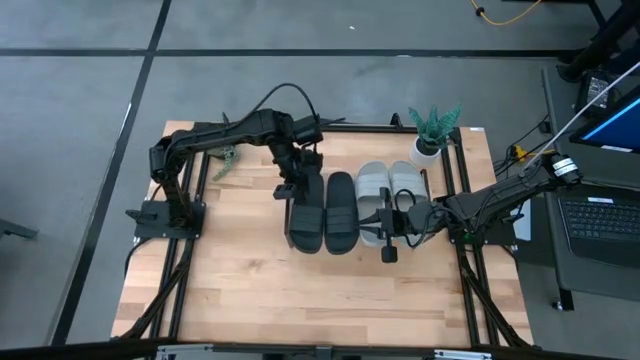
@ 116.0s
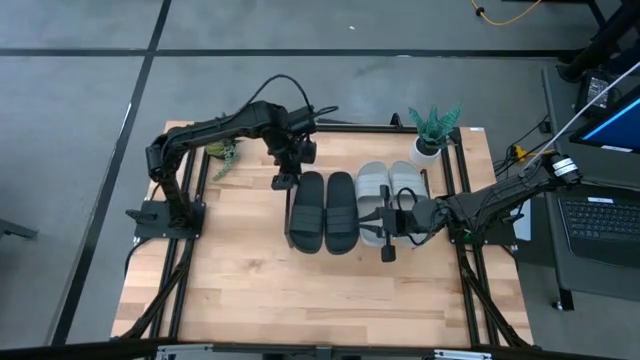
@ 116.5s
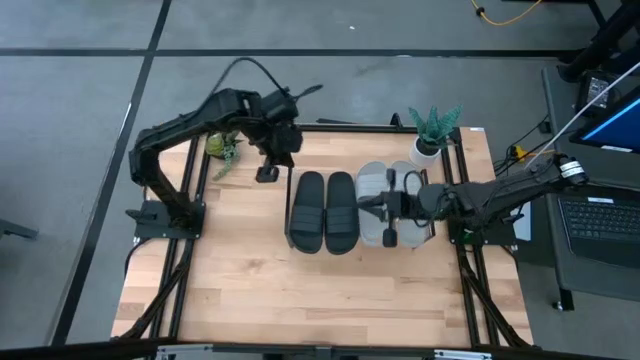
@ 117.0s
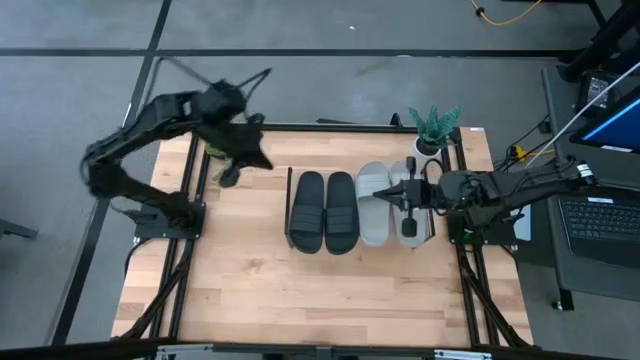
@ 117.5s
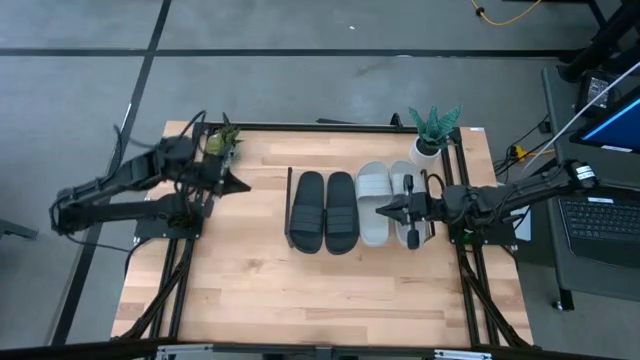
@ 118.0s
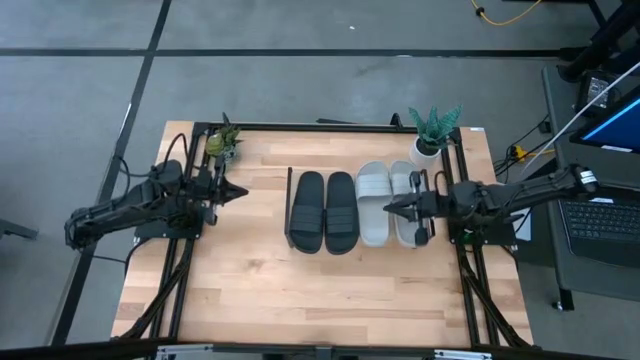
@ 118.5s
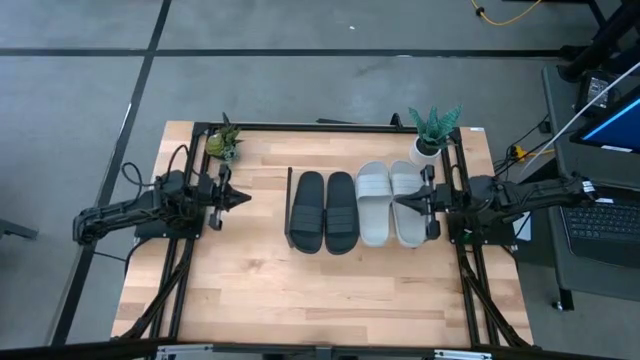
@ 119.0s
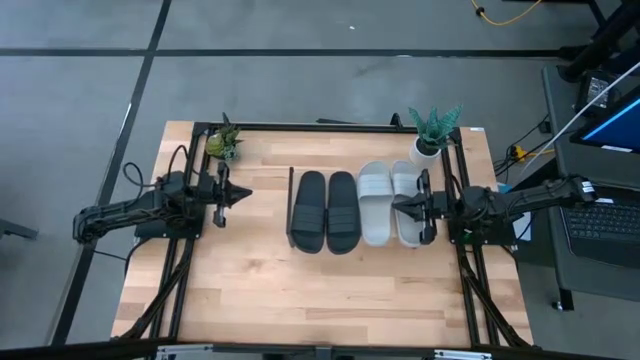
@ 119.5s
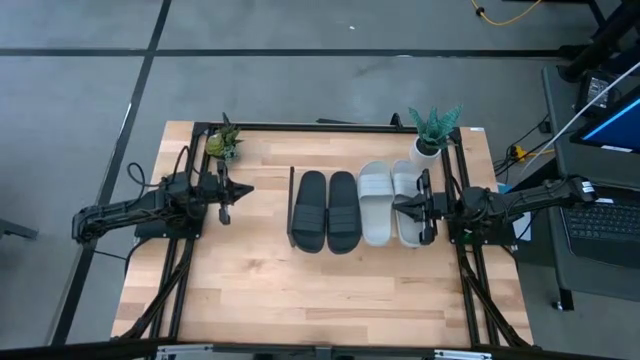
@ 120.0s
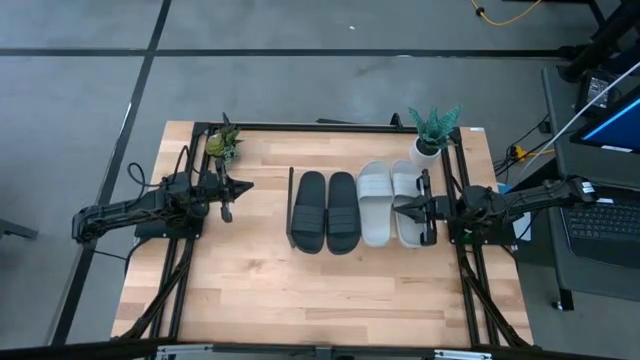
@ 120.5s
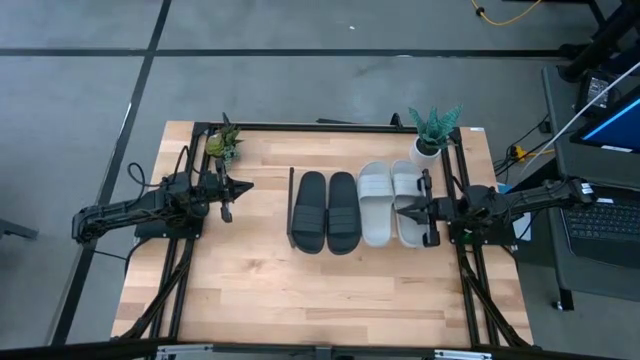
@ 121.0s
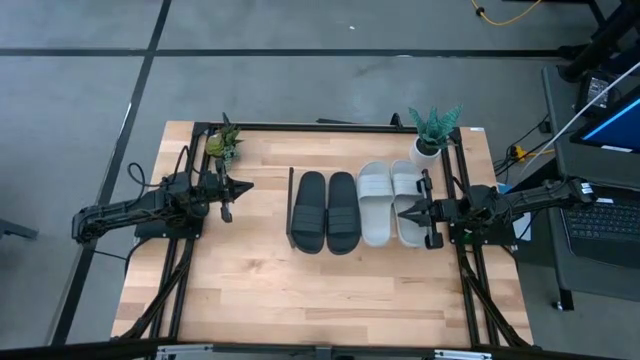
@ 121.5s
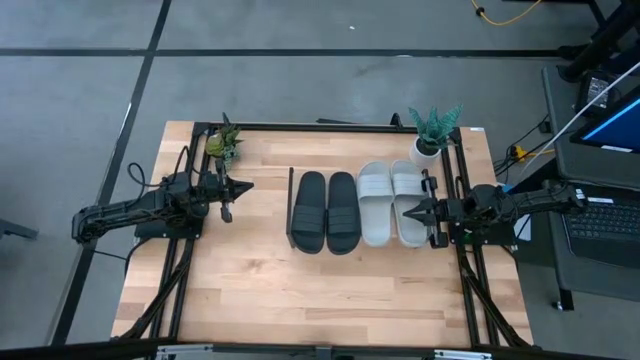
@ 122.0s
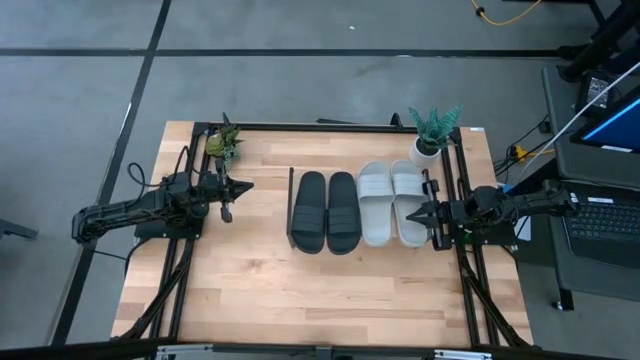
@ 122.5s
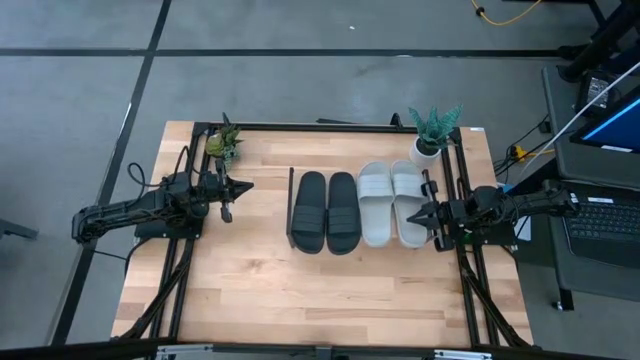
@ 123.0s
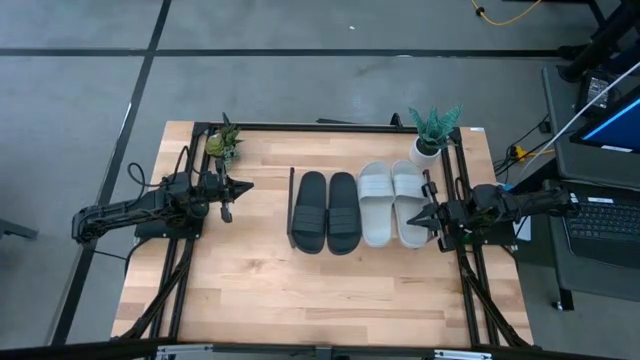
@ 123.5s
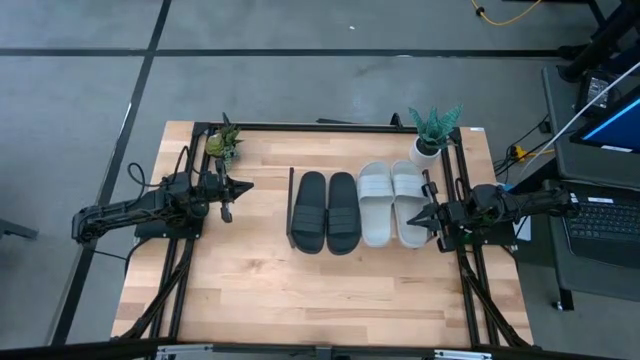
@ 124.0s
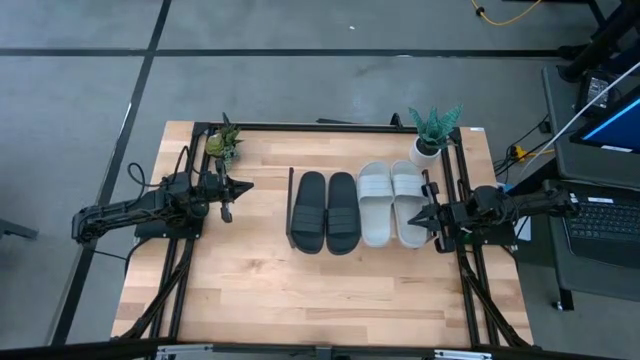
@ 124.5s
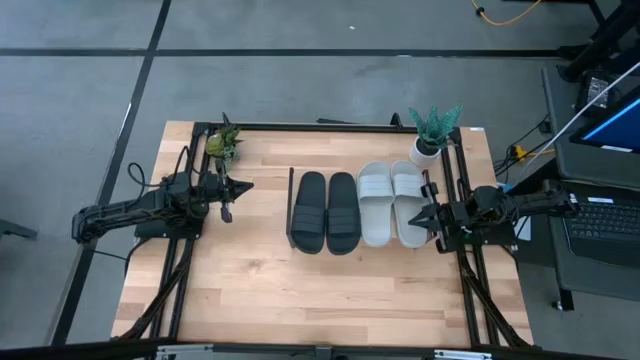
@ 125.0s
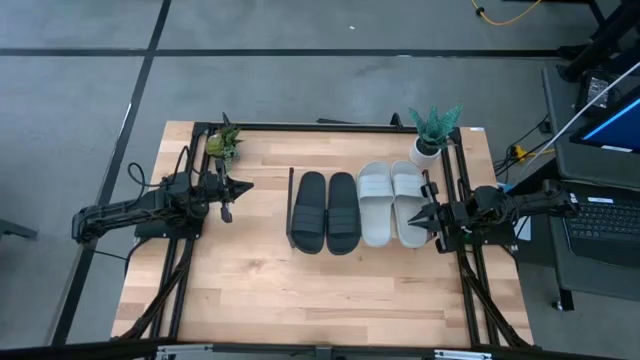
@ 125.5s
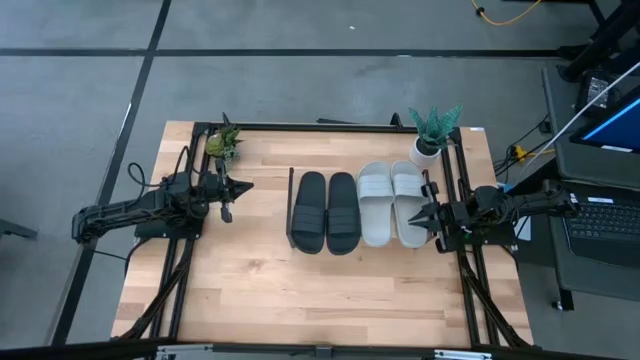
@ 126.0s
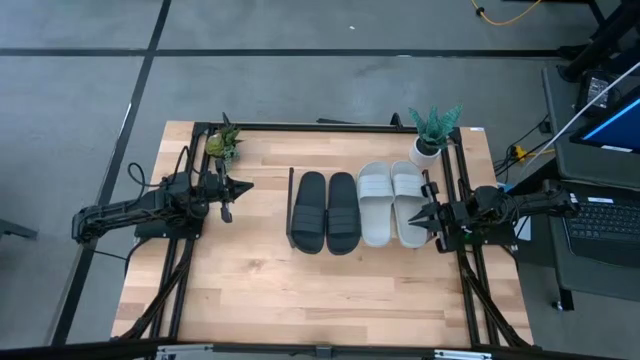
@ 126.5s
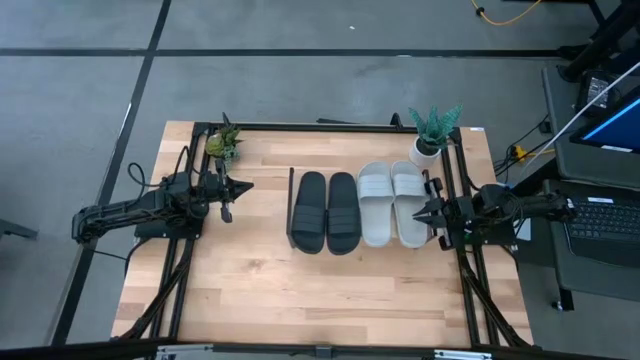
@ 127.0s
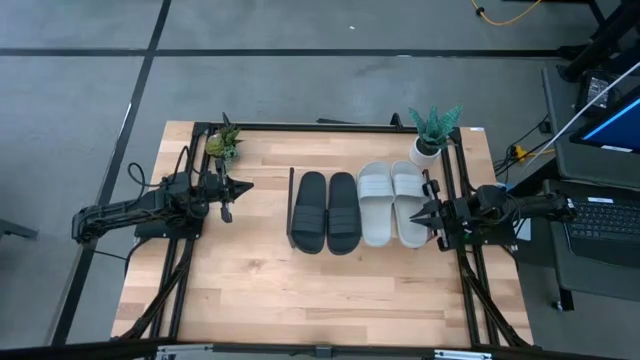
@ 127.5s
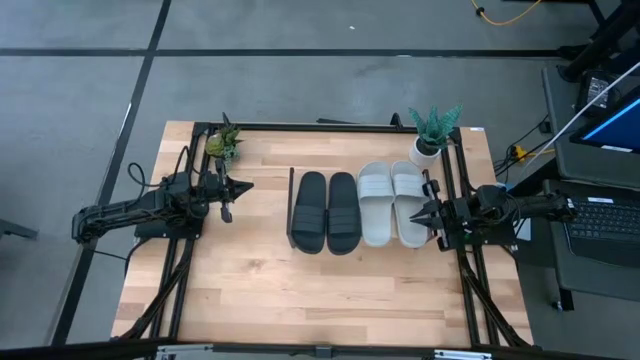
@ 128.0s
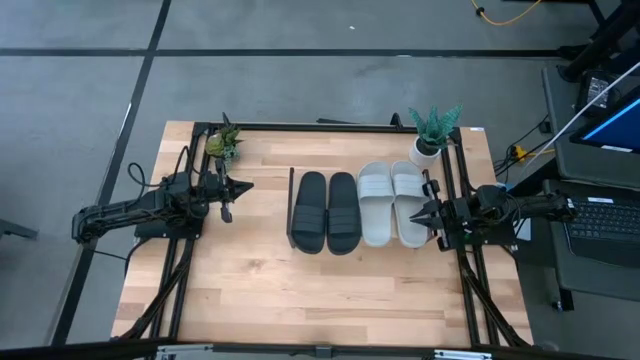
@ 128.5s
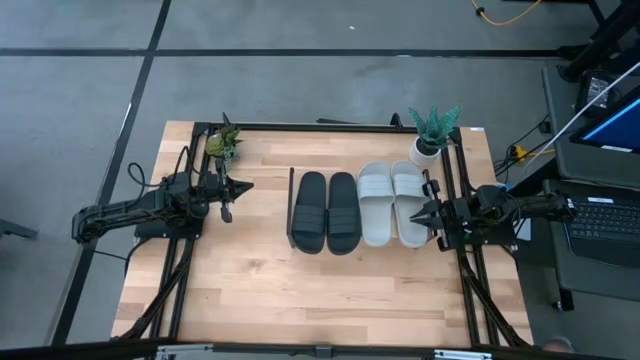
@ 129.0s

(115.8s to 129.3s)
Task: Pick and place slides into the shelf
Return to Home Position

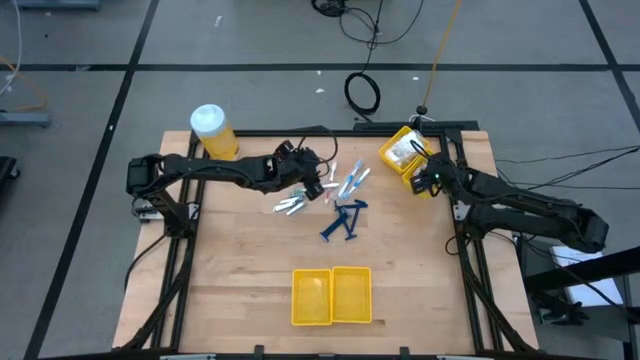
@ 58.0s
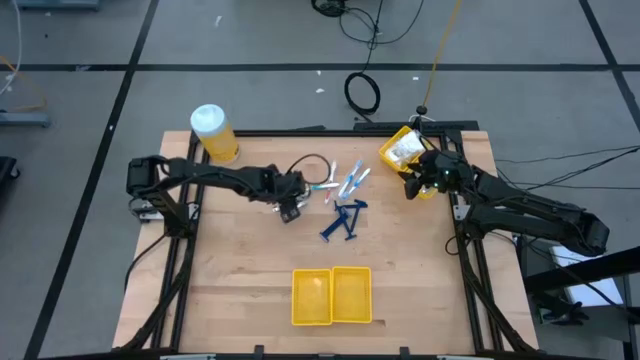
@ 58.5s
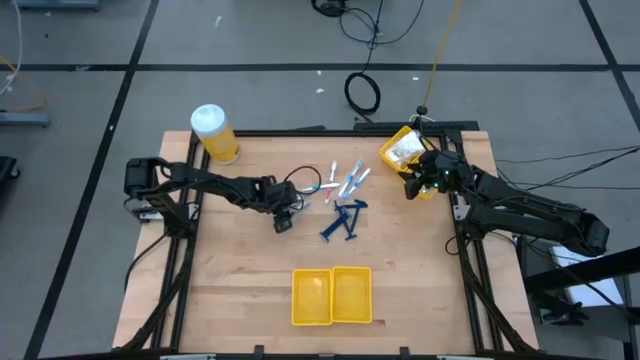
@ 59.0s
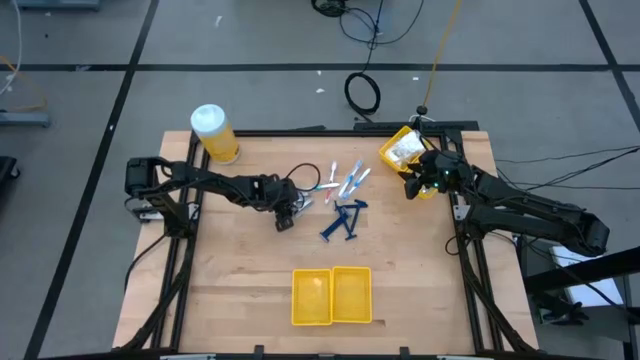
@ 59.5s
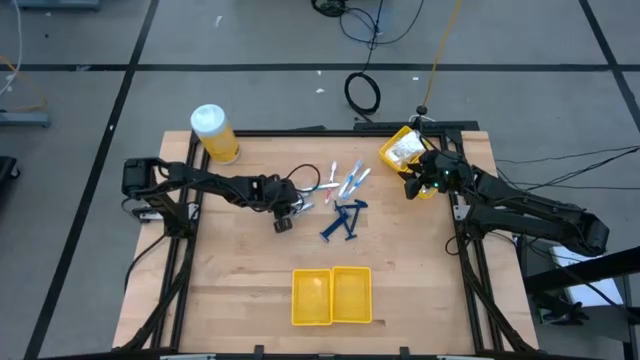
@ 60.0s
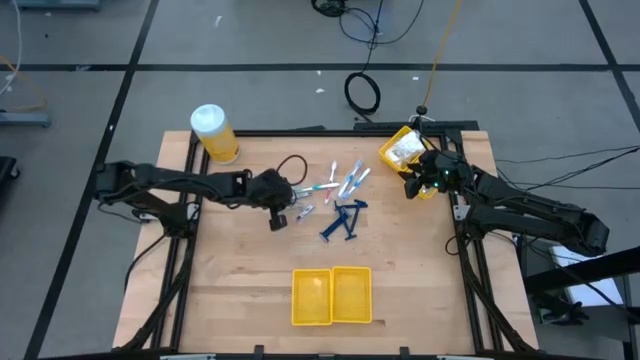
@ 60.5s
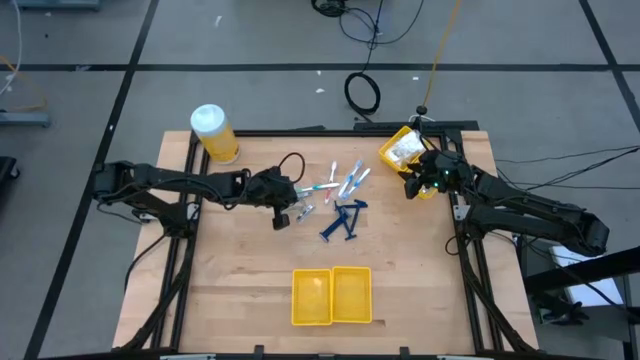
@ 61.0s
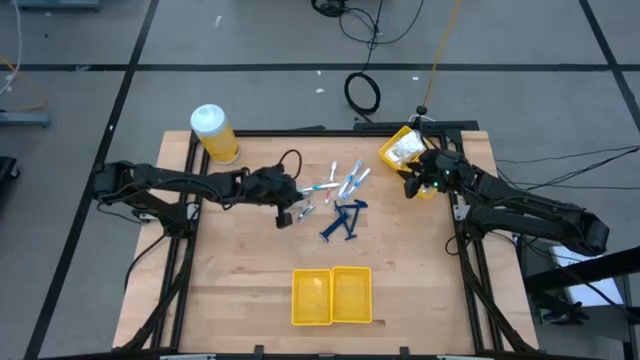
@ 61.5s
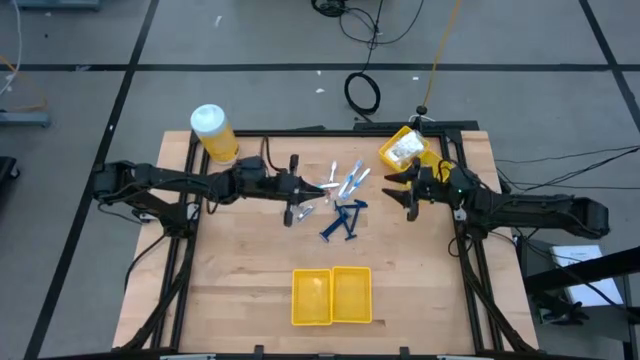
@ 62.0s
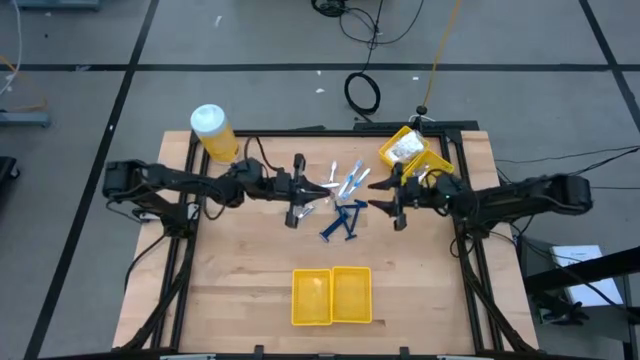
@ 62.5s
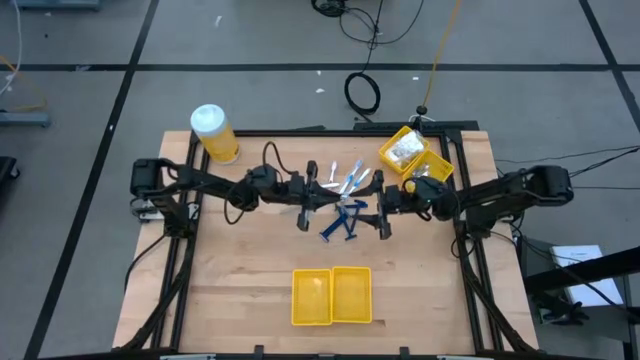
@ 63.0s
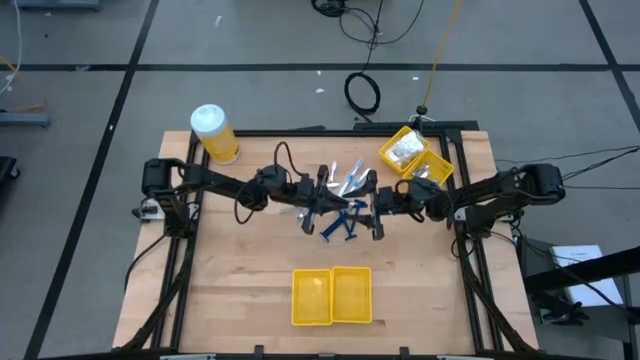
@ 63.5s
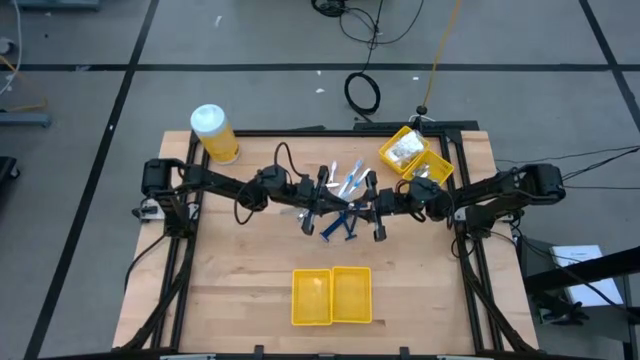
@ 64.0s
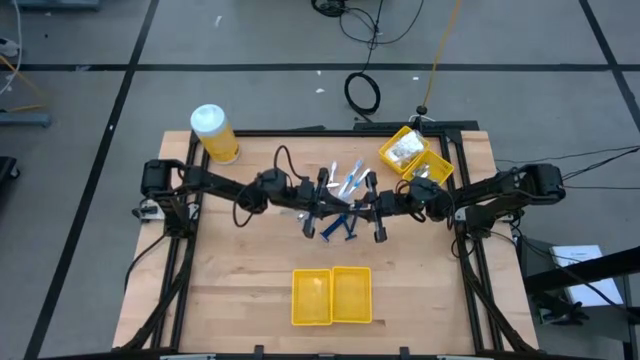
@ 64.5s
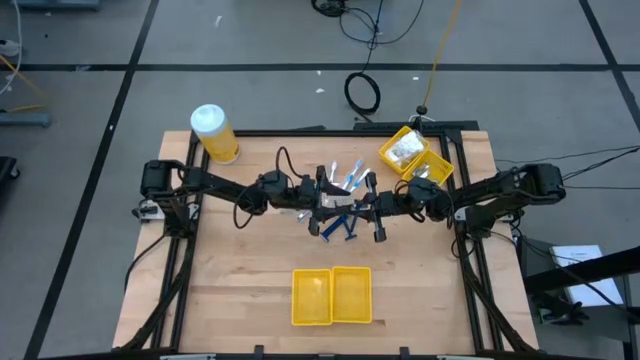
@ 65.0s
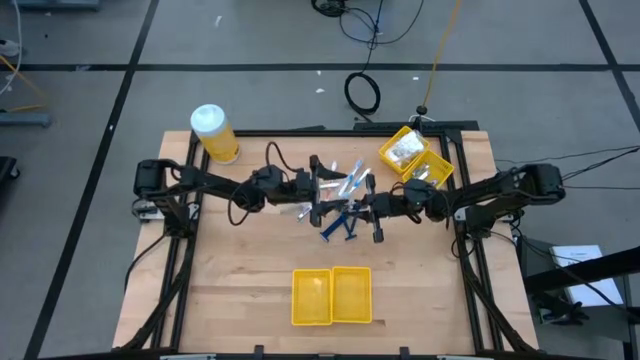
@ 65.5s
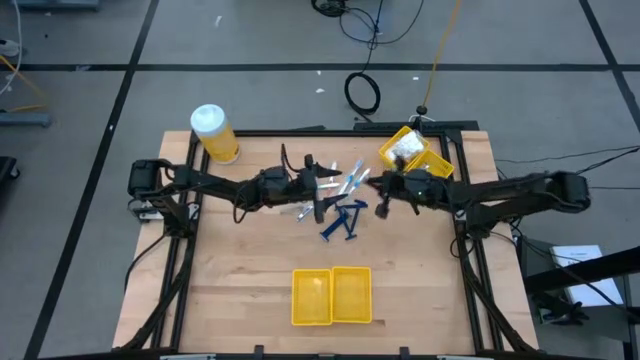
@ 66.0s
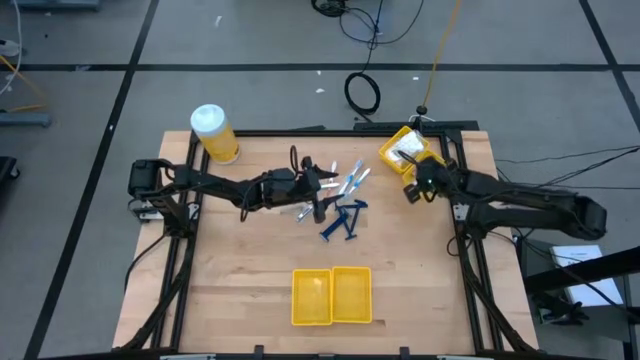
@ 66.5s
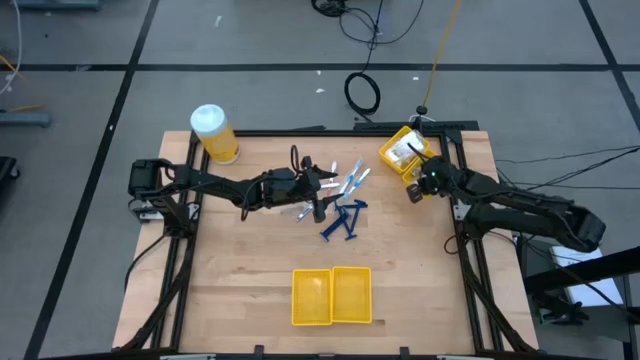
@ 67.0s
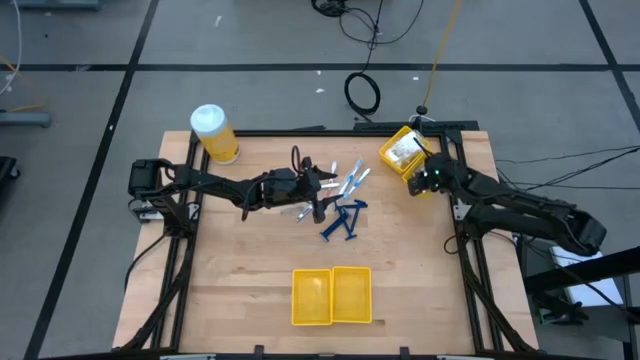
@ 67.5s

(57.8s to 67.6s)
Task: Pick & Place Travel size toiletries
Put the silver nail cutter into the top right yellow bin
